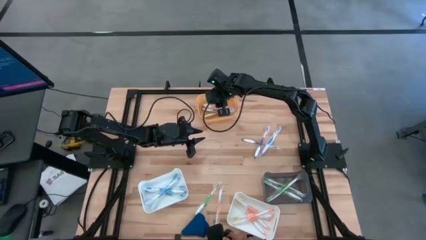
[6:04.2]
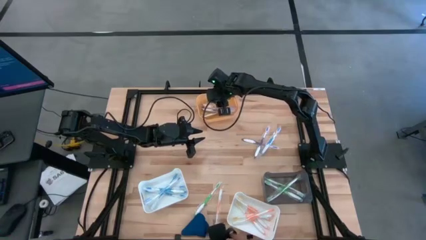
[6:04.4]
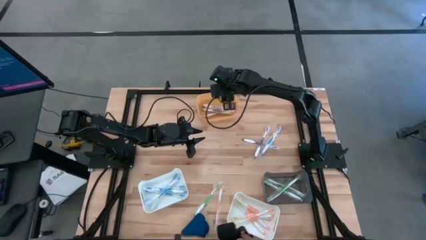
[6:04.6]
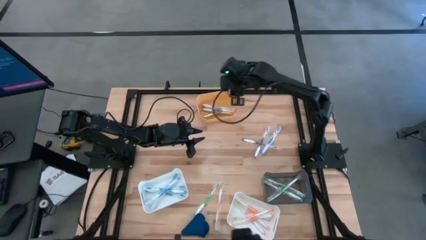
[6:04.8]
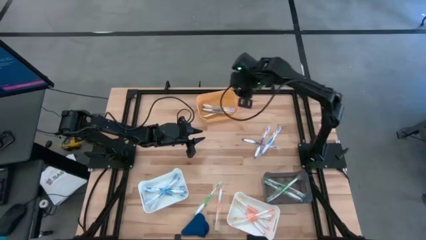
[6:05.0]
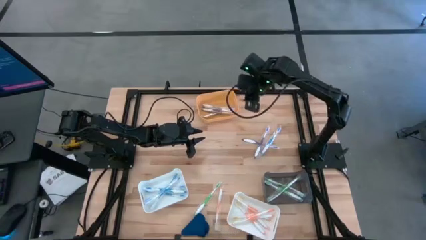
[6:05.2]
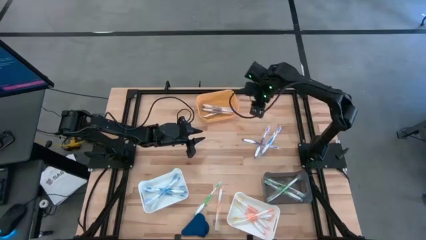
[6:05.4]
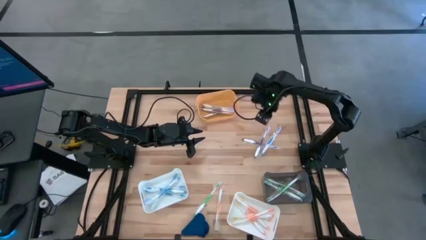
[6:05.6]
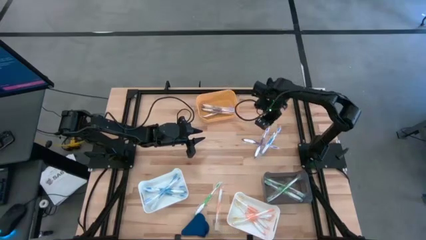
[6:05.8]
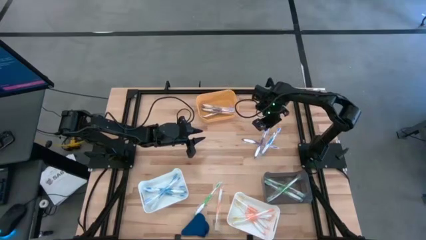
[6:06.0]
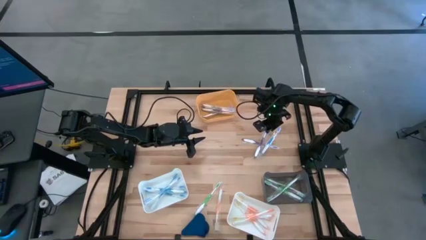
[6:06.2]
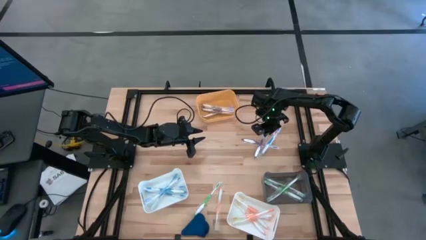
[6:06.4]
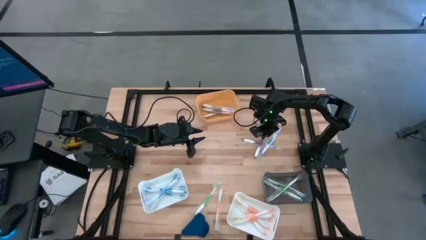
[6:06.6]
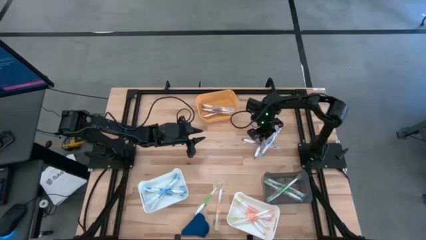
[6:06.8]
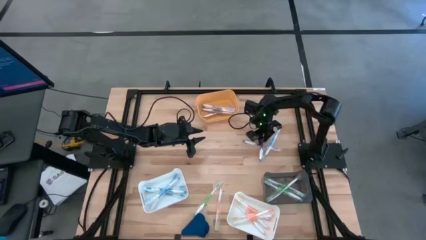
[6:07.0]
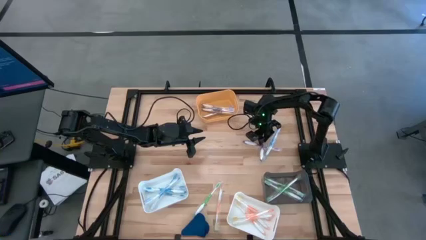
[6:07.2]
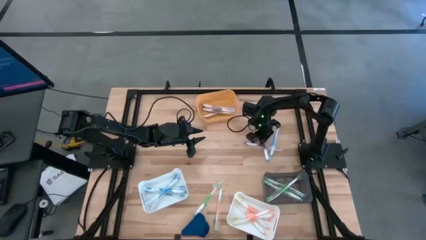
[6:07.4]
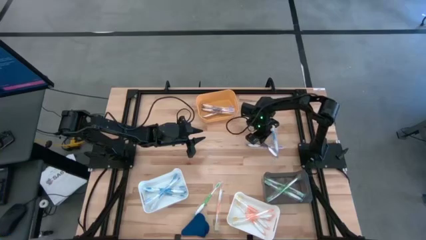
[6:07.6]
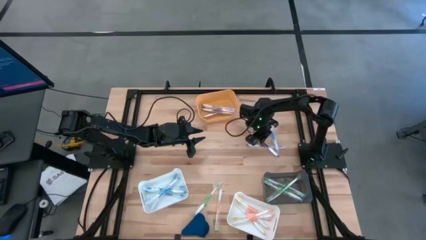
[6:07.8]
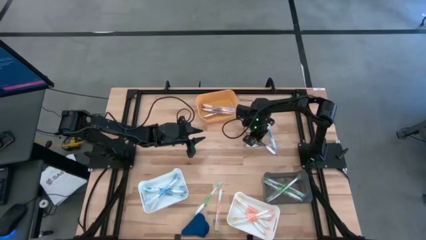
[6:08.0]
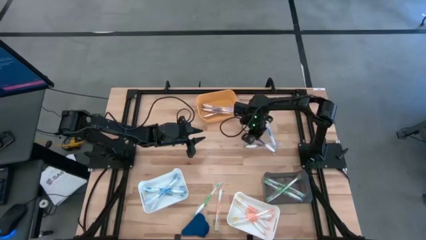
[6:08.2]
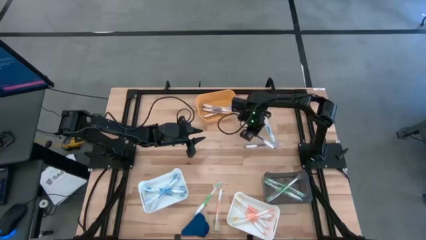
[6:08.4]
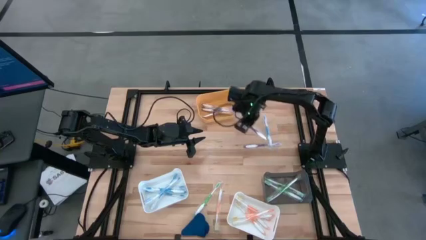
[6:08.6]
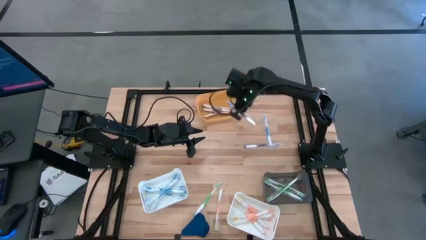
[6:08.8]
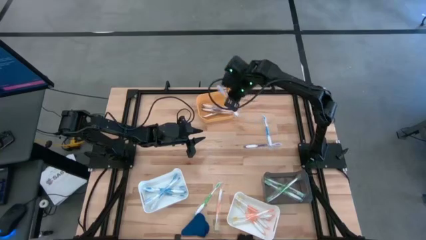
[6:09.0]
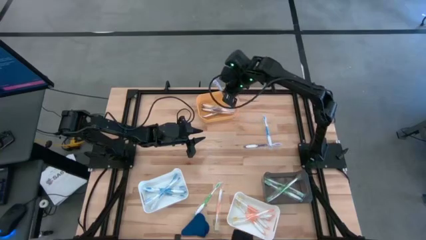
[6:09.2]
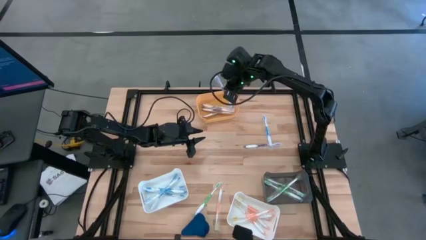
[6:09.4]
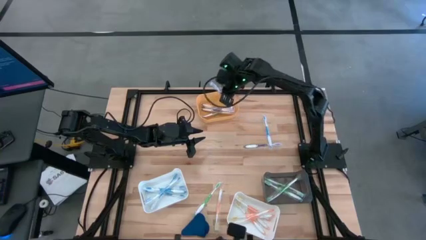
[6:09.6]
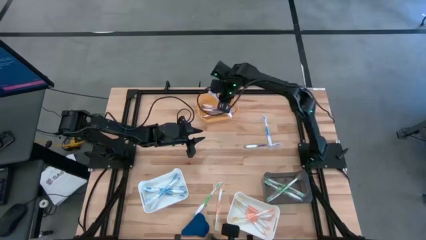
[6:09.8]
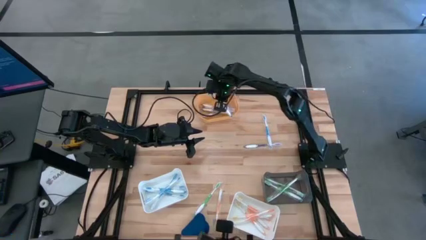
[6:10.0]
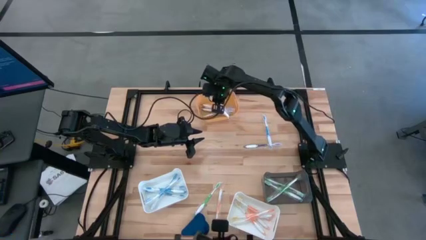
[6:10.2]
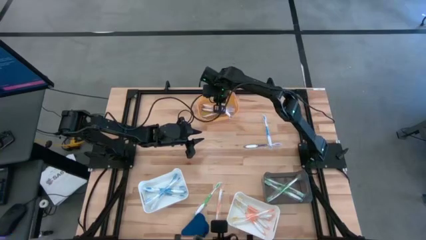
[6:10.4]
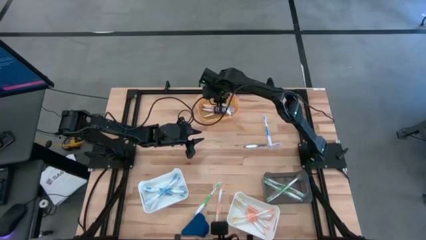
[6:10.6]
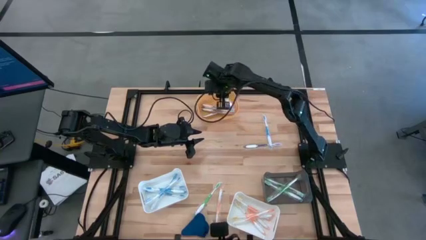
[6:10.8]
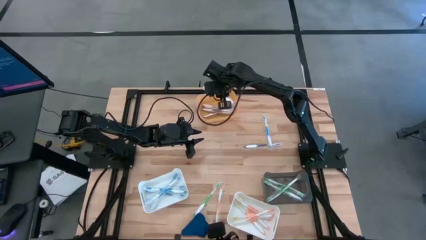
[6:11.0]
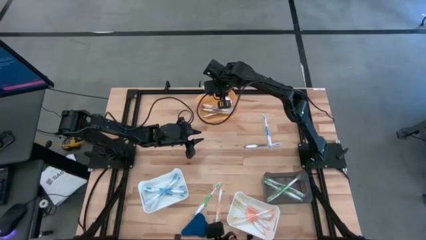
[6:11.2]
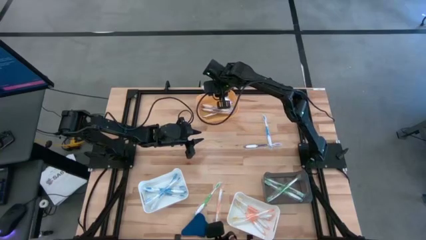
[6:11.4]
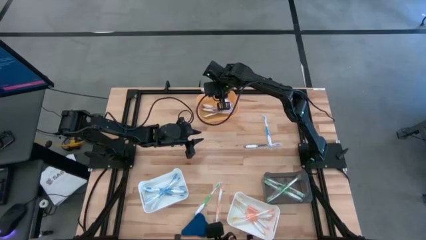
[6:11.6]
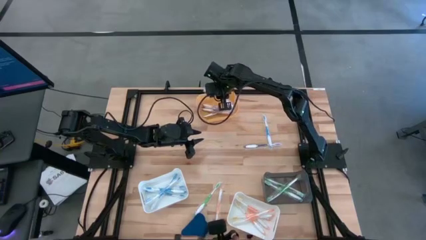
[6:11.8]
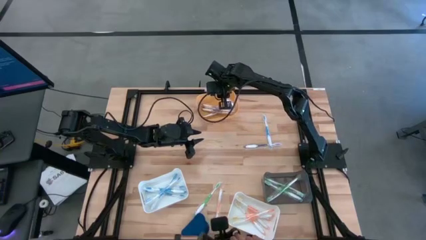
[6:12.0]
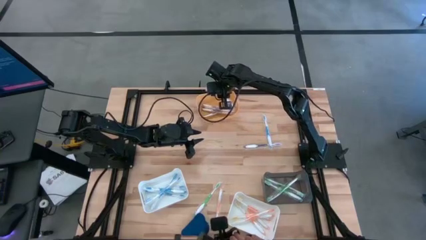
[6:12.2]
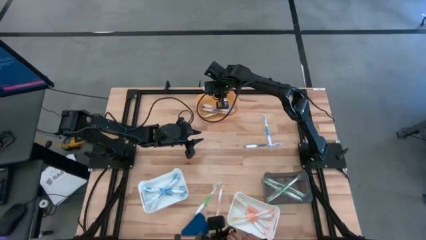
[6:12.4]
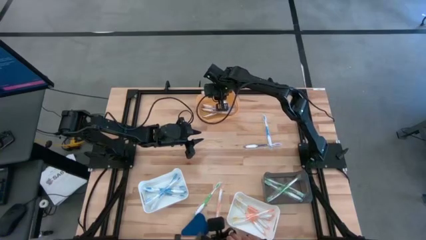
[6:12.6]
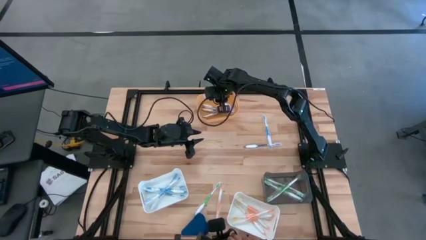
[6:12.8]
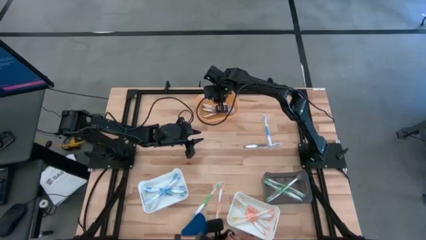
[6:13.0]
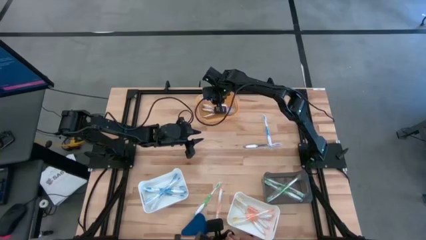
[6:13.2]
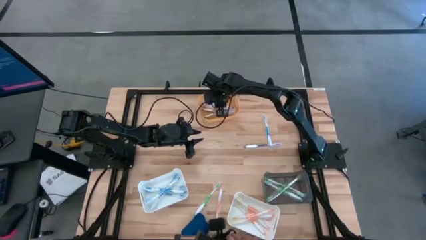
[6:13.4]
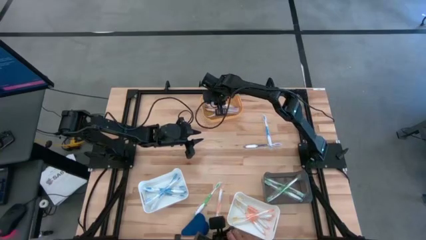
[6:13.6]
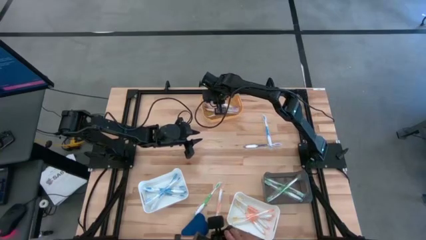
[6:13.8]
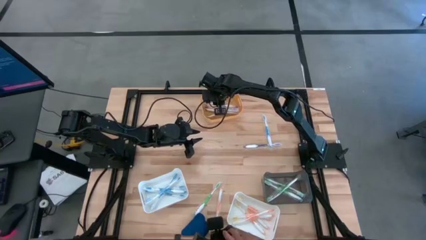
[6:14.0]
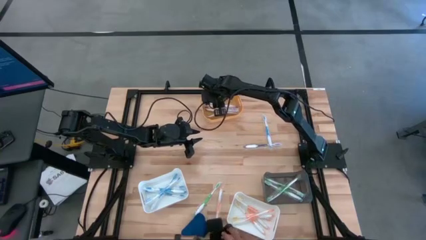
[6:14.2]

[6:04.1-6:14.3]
Task: Pick & Place Toothbrushes
Put the purple toothbrush into the yellow bin

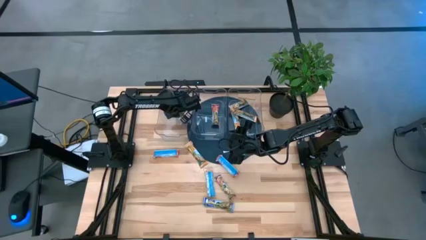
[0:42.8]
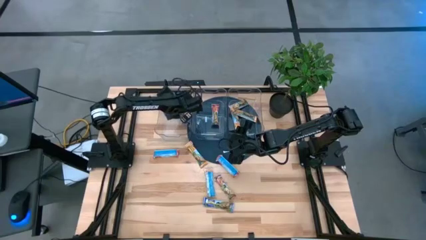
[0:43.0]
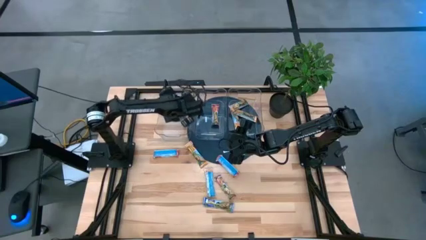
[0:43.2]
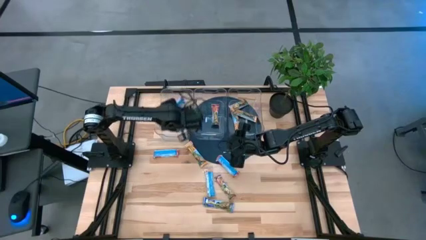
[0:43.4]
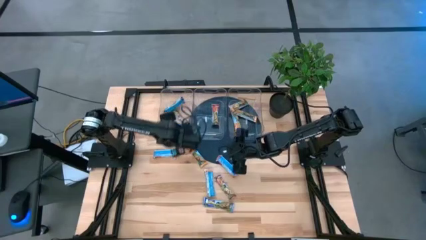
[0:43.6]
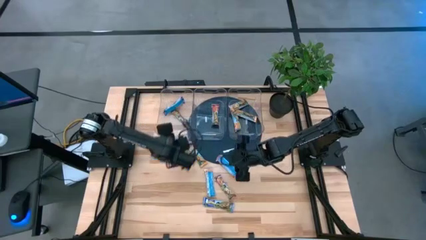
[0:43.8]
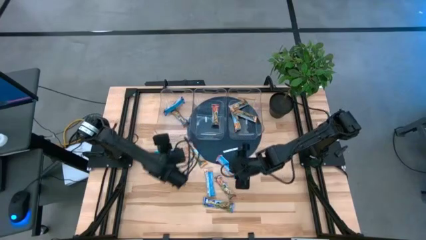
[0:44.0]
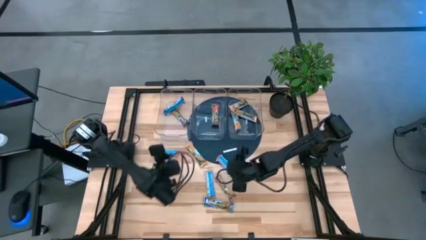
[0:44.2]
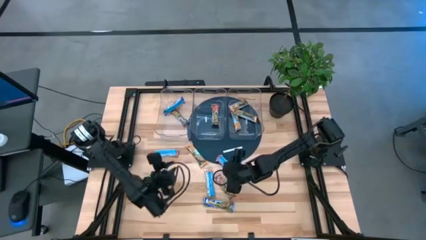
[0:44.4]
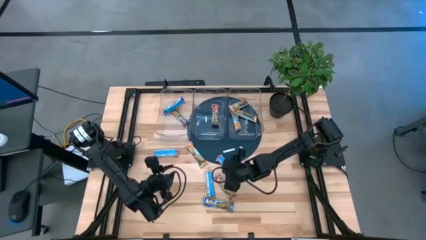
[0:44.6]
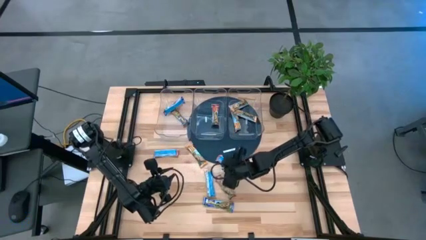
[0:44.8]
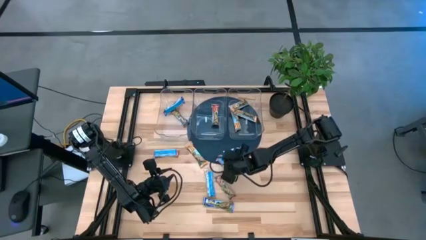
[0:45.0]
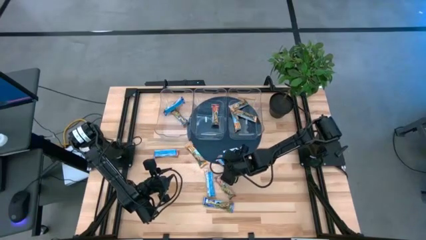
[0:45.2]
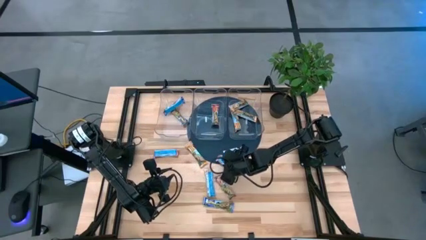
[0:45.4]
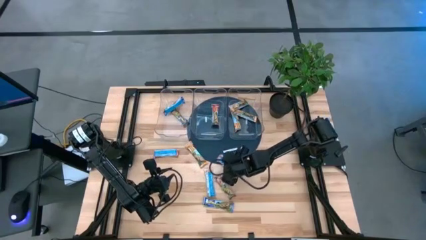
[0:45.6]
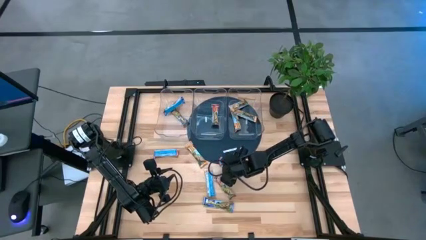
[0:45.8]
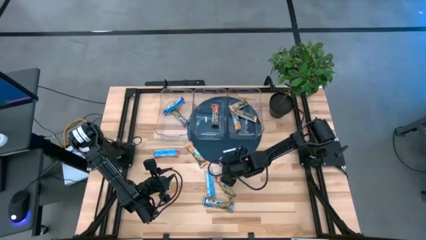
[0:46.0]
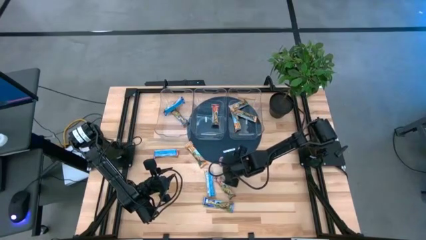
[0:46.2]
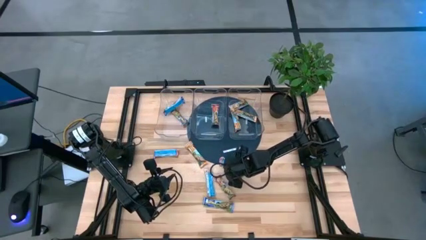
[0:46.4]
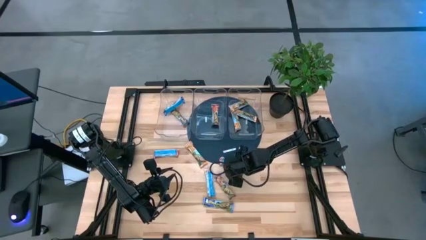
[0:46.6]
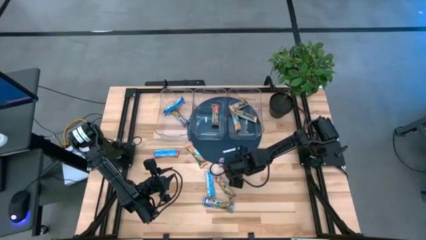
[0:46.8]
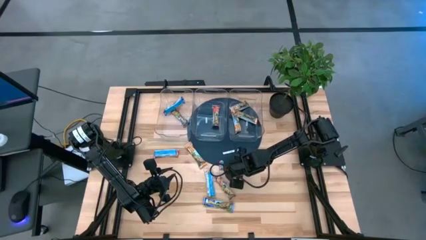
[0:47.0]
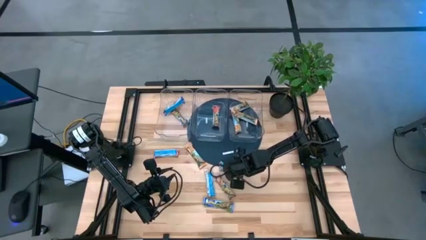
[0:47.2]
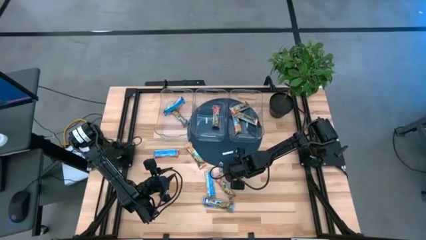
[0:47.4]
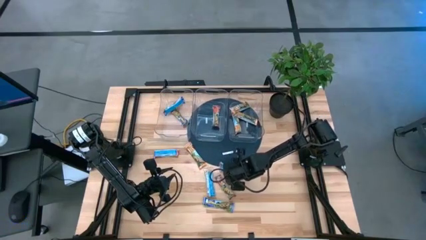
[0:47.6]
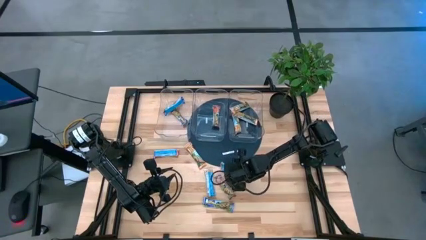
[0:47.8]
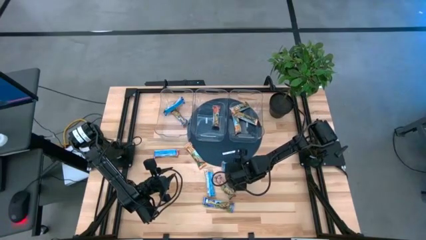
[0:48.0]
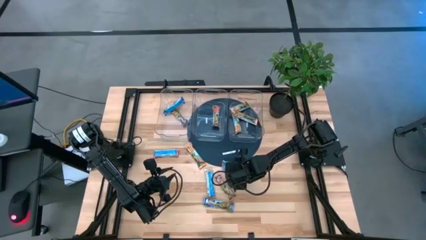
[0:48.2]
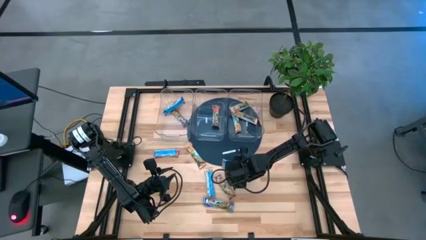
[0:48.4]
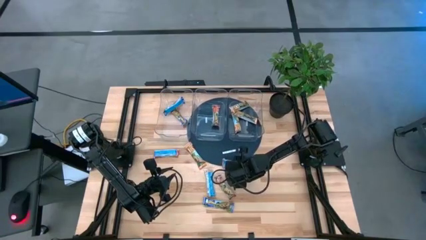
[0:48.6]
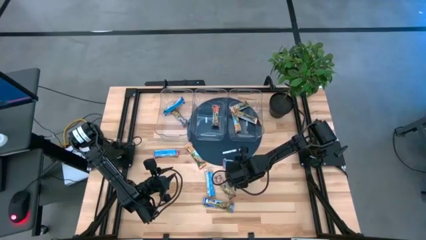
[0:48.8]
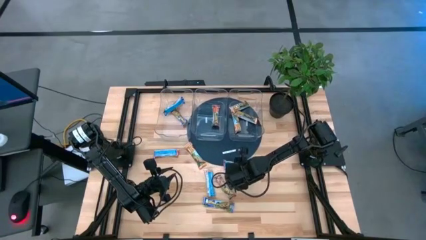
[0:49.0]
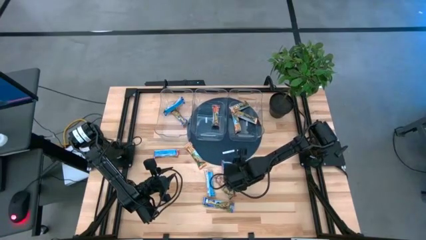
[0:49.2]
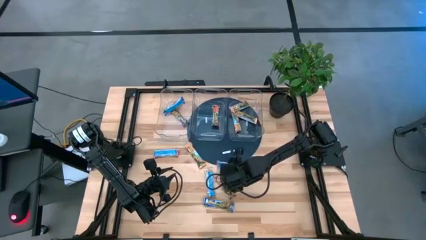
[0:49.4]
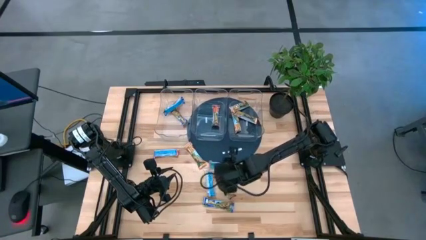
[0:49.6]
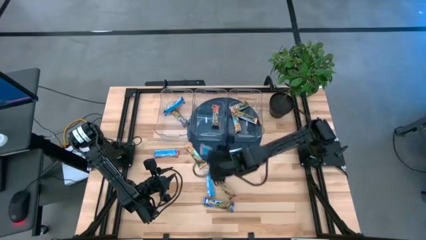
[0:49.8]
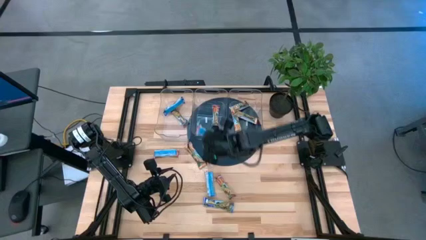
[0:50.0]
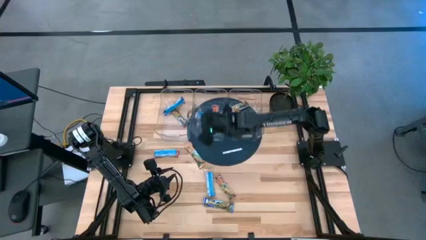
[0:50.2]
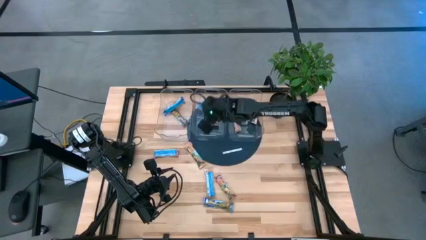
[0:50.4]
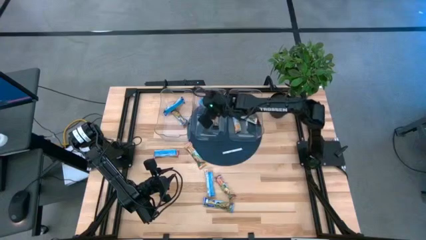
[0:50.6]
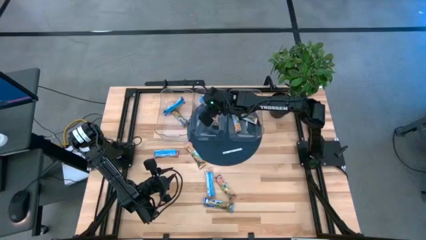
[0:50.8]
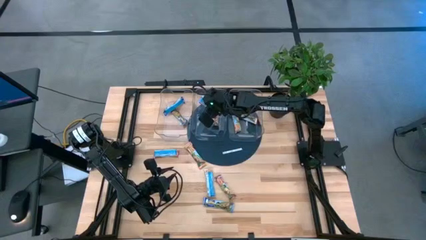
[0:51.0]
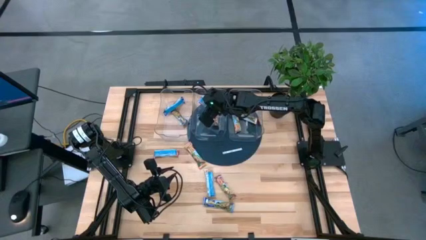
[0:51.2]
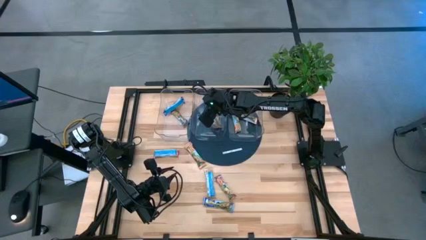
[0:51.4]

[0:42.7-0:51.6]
Task: Pick and place Granola Bars by type
Put the red granola bar into the middle transparent bin
